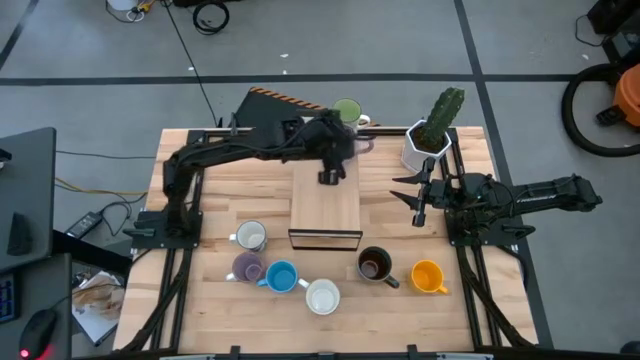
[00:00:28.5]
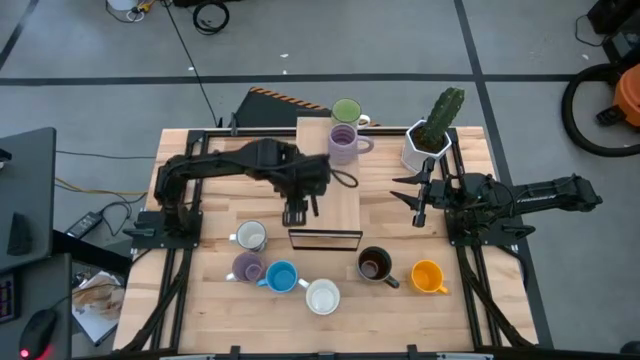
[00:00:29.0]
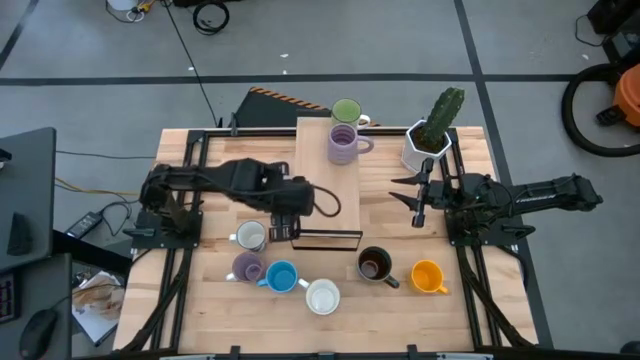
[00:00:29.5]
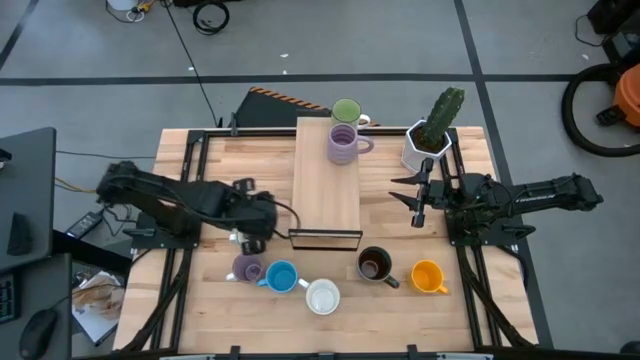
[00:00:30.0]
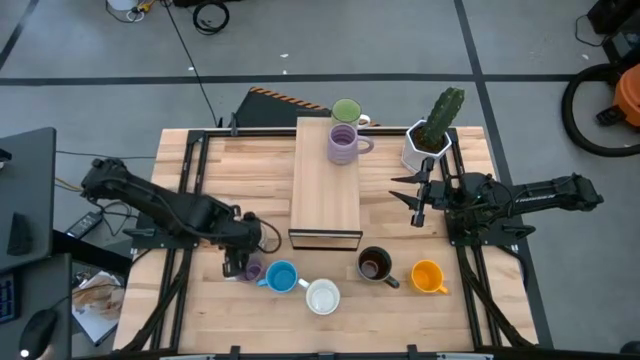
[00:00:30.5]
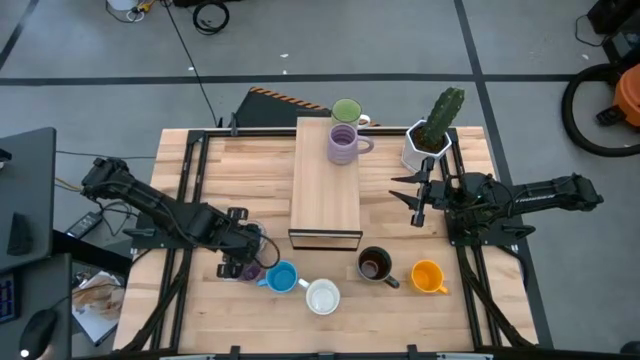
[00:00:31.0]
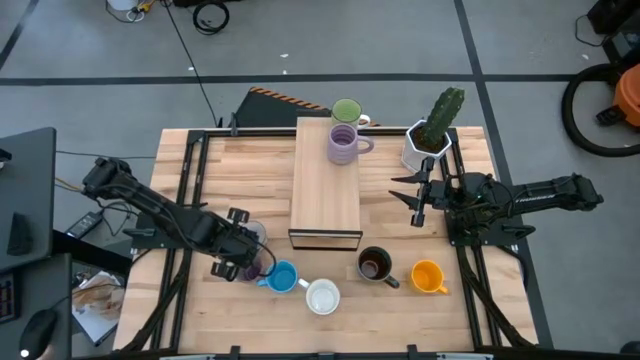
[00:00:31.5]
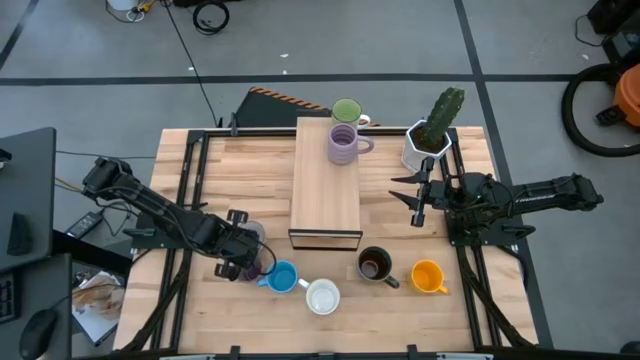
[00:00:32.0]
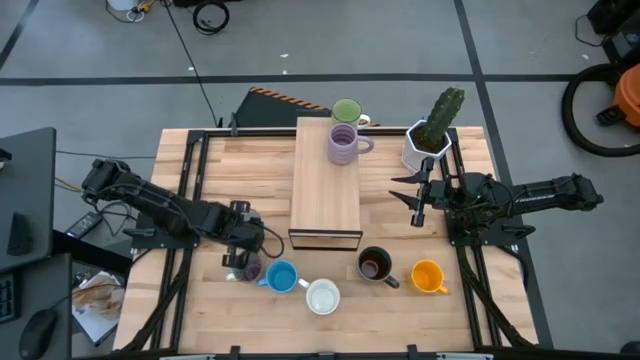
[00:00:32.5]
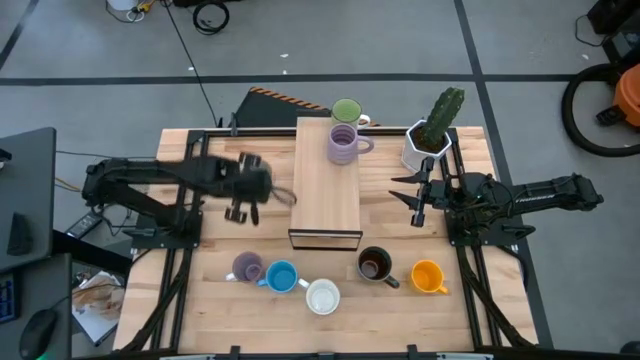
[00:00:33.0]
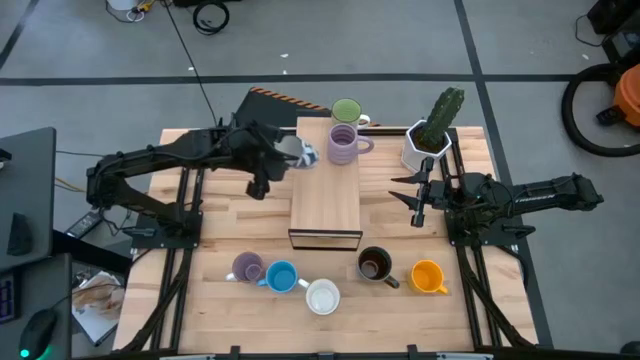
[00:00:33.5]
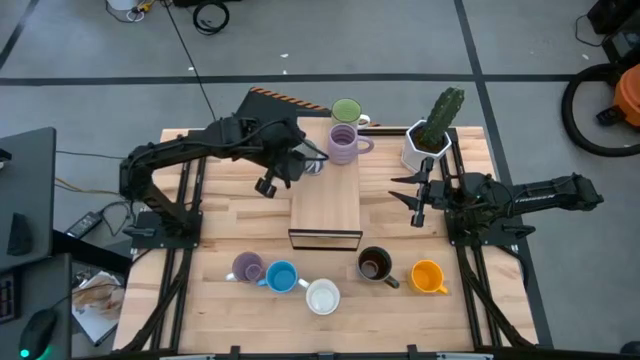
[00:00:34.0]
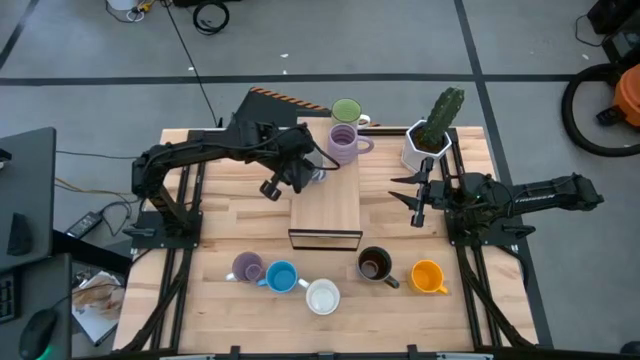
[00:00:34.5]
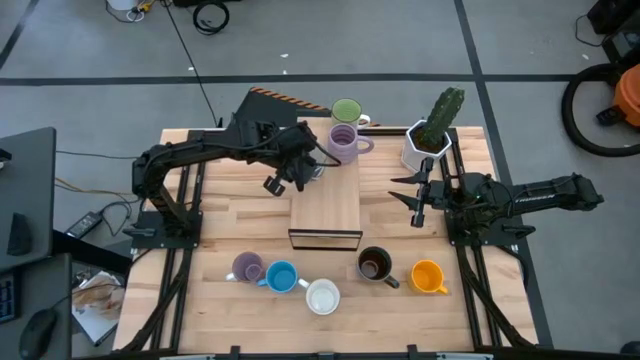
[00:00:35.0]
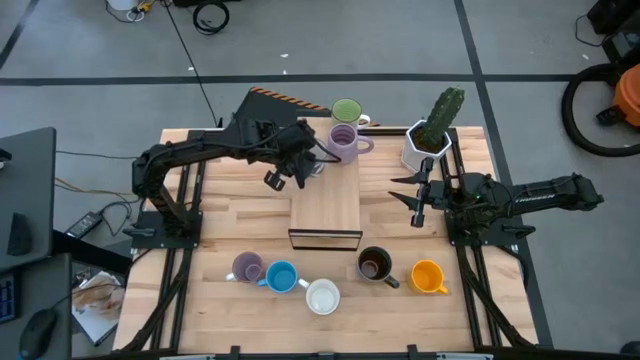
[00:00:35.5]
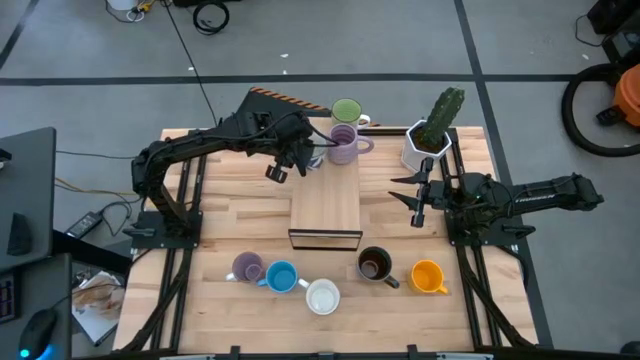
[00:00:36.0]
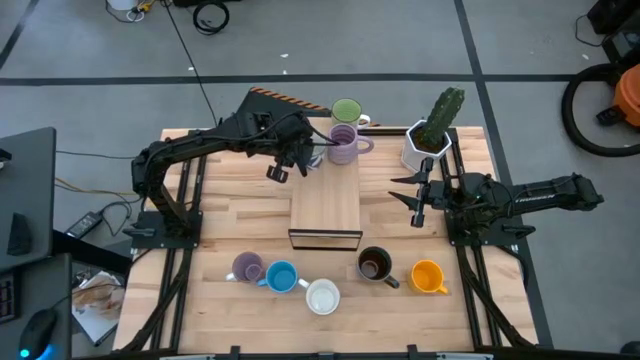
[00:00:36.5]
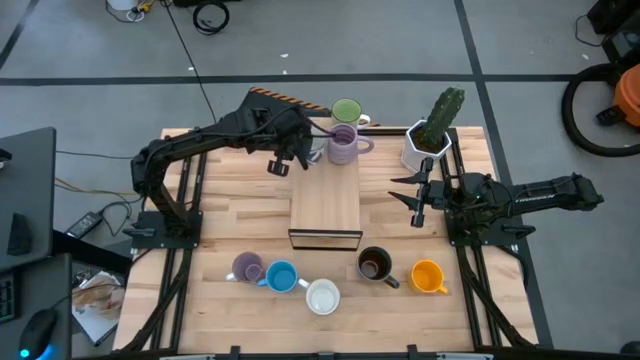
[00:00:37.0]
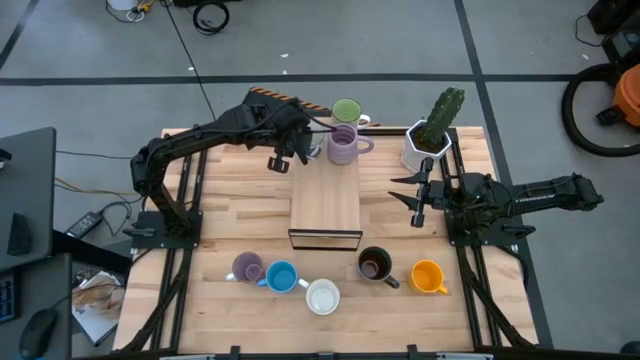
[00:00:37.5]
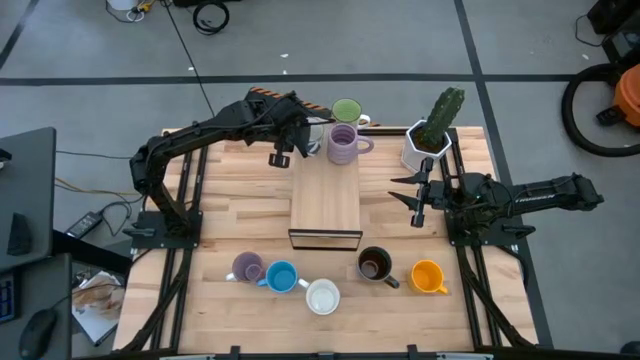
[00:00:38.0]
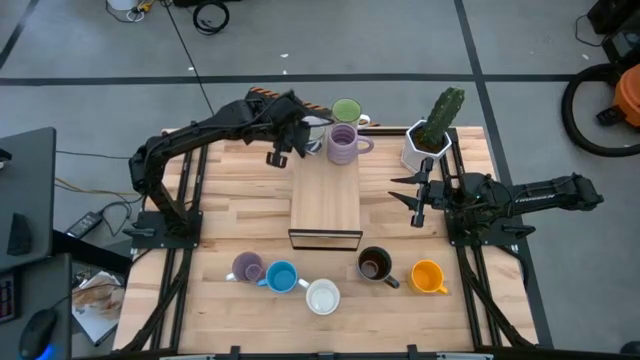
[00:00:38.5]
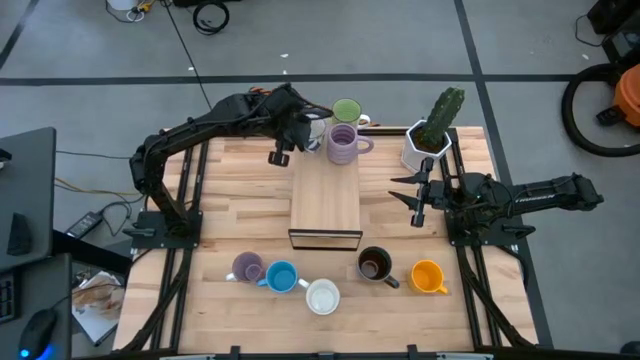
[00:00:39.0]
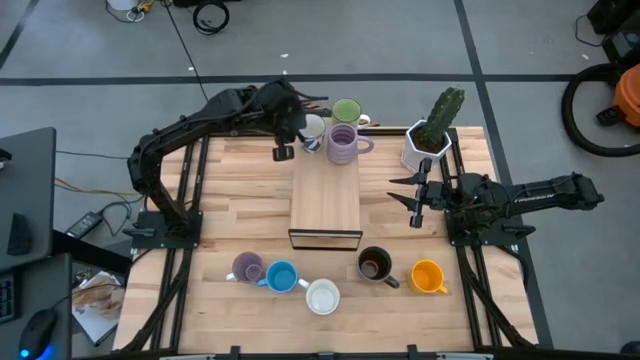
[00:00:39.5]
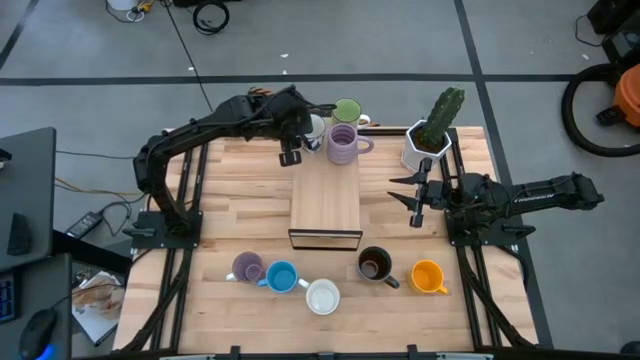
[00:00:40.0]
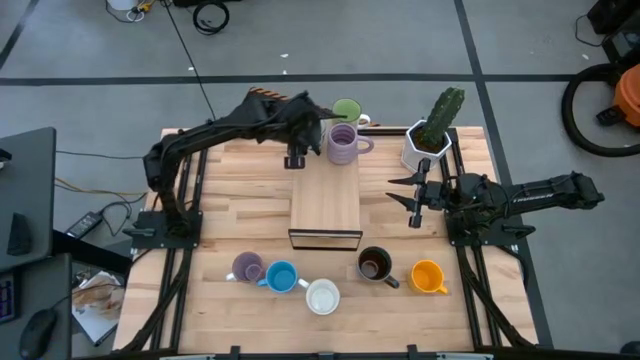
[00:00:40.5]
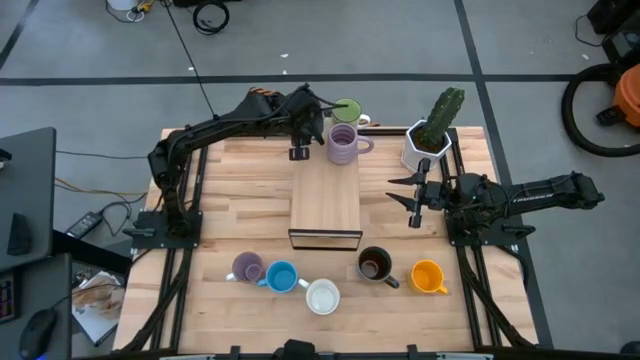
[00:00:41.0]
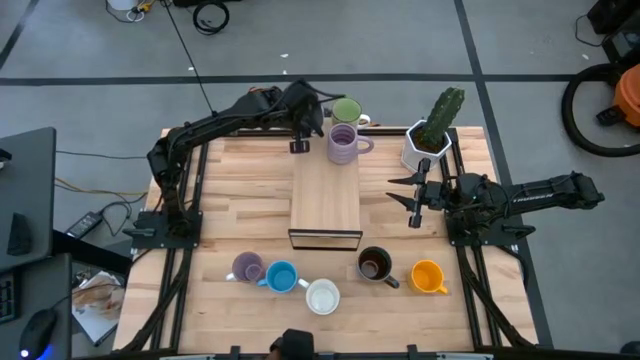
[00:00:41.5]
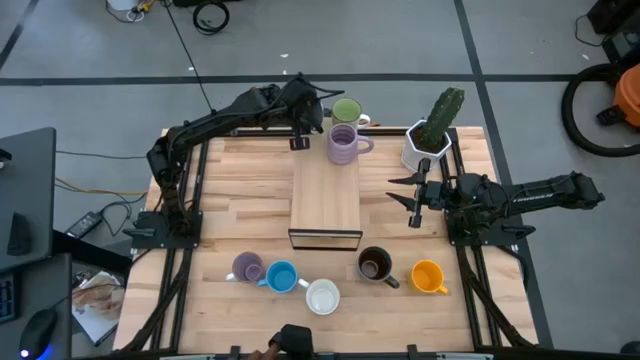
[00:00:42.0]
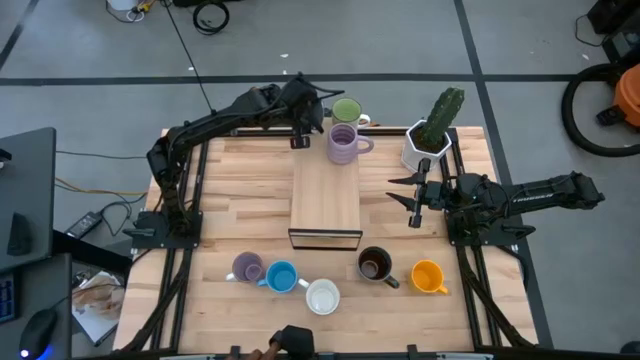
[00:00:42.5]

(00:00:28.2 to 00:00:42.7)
Task: Place coffee mugs
Put the white-blue mug on the shelf

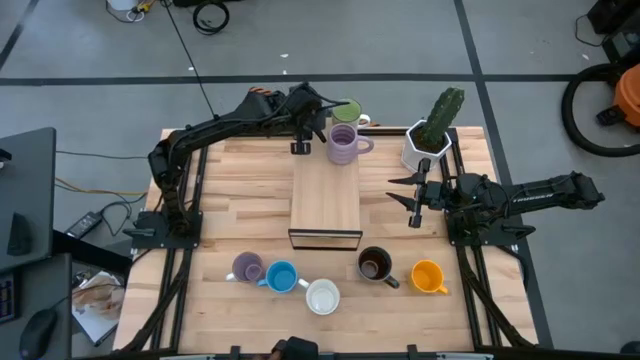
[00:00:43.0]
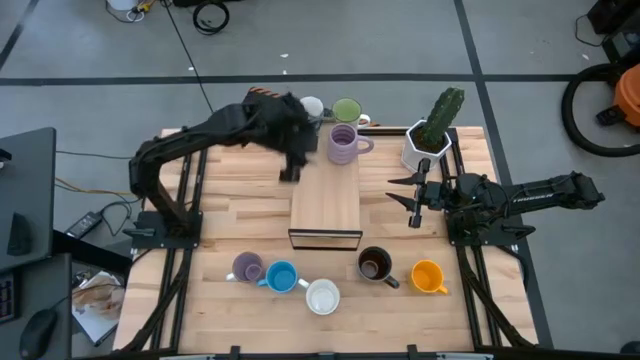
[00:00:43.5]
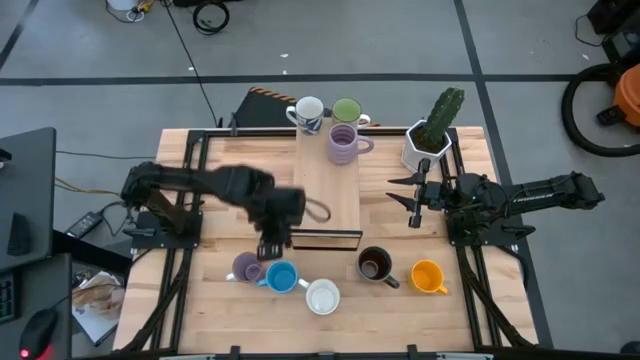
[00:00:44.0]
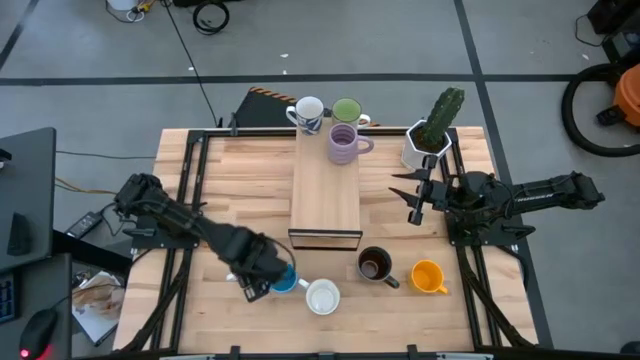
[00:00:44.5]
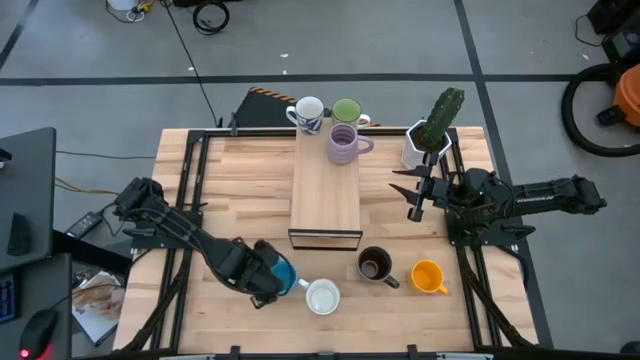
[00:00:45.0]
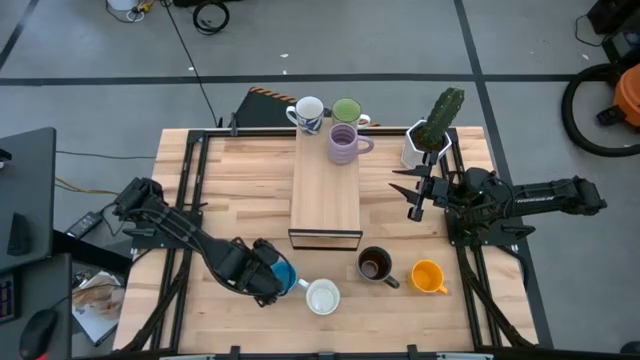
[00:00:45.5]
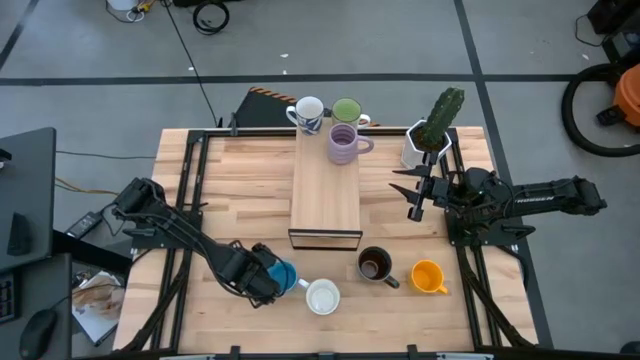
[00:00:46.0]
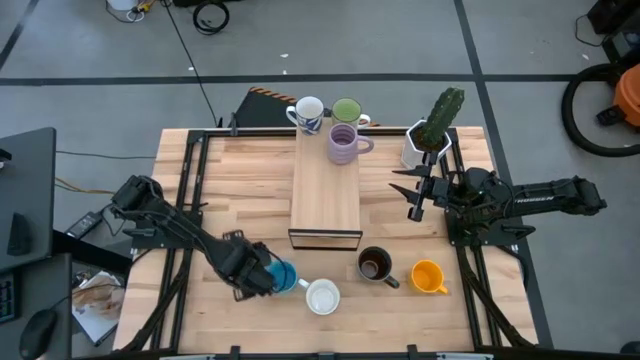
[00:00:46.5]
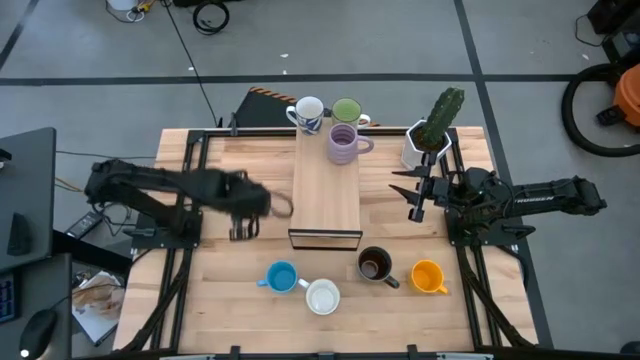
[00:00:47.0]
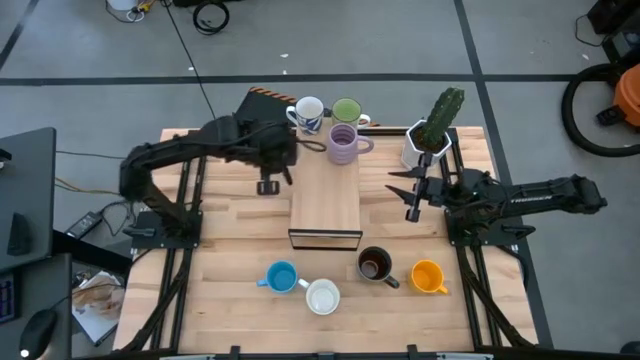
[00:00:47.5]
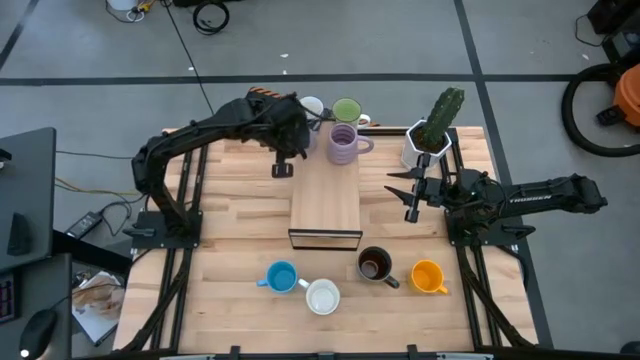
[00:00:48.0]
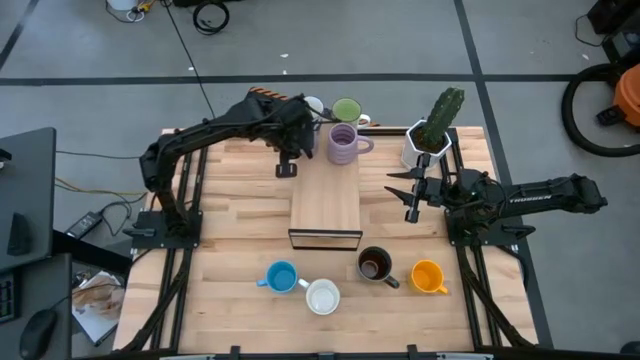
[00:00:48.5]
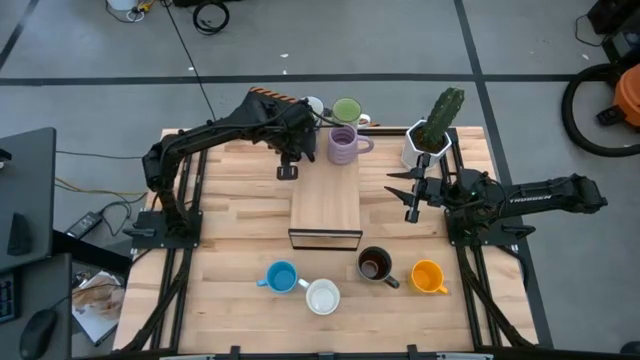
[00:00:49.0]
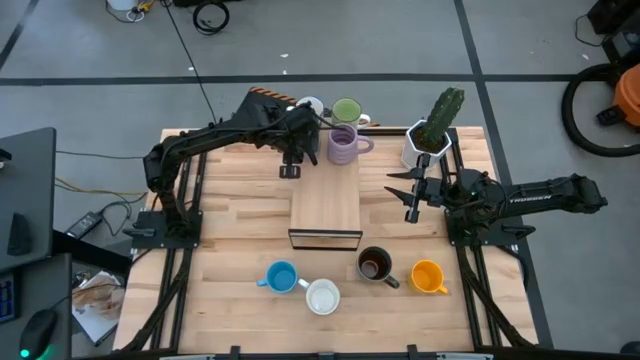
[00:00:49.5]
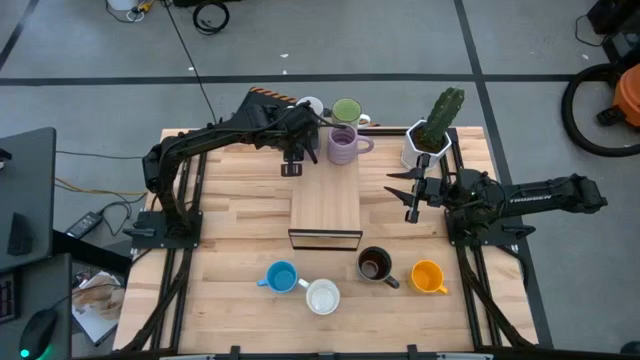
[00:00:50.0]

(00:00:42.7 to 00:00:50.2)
Put the purple mug on the shelf
